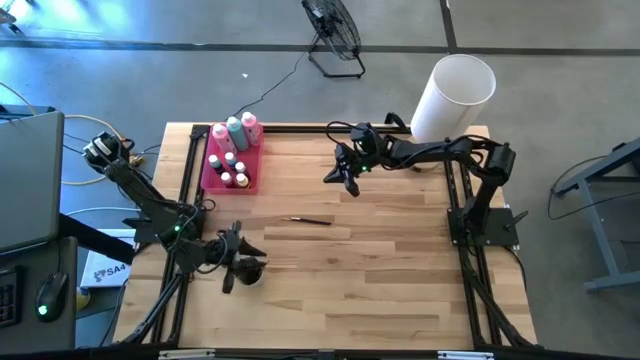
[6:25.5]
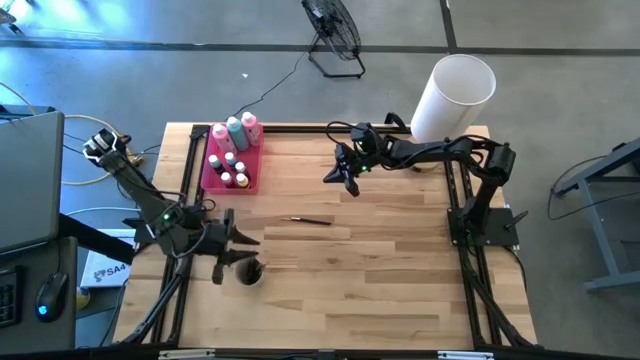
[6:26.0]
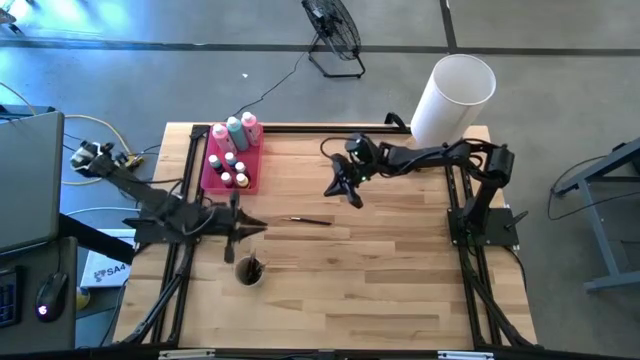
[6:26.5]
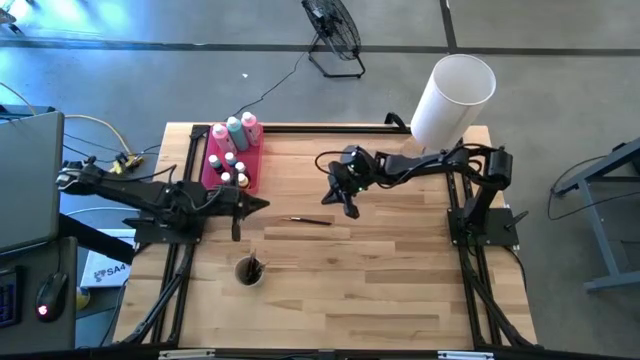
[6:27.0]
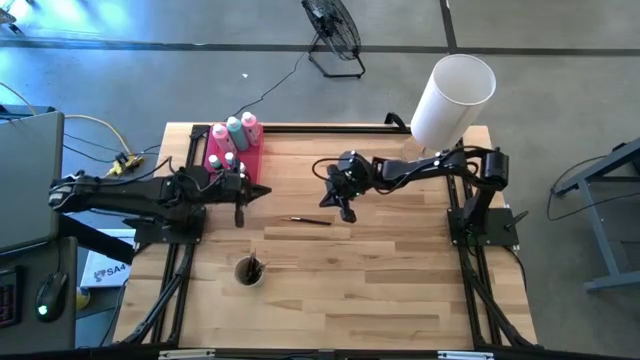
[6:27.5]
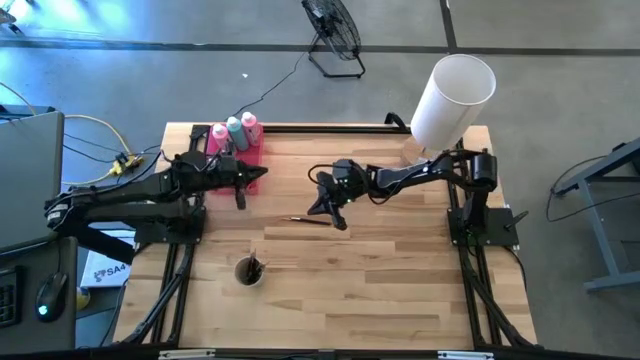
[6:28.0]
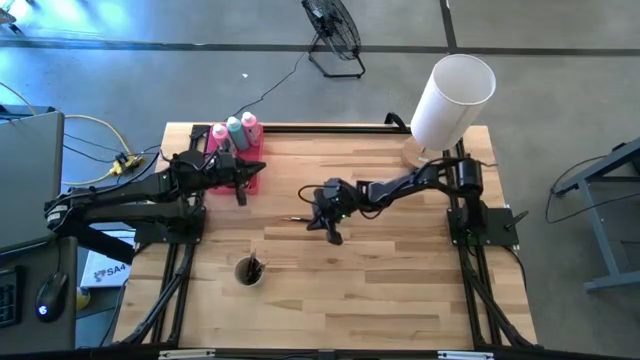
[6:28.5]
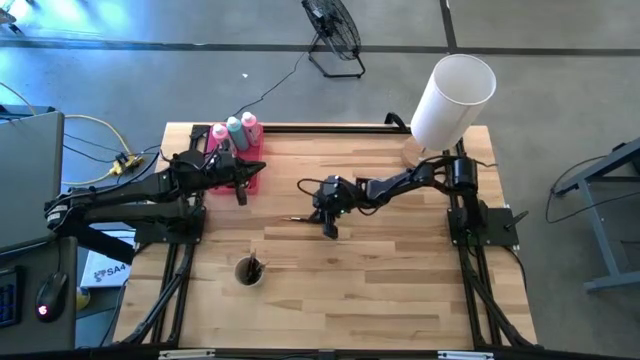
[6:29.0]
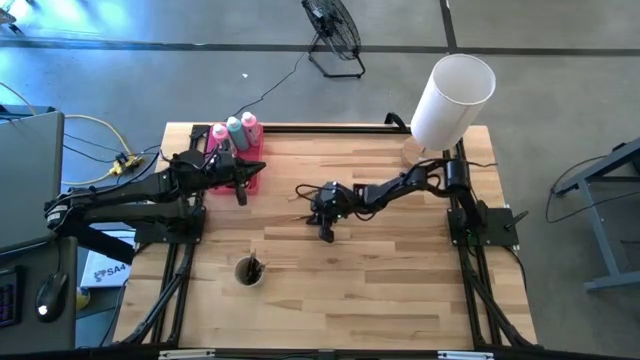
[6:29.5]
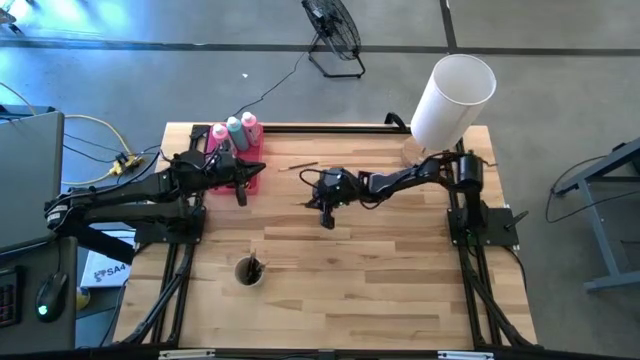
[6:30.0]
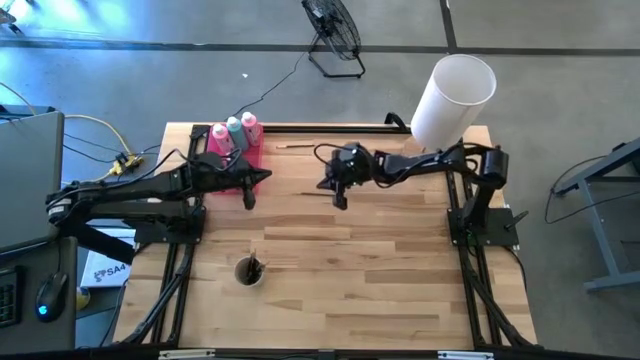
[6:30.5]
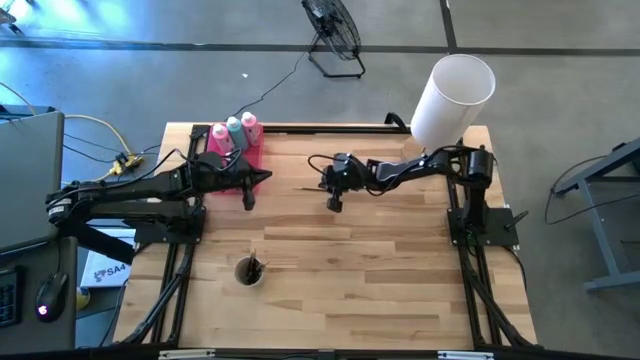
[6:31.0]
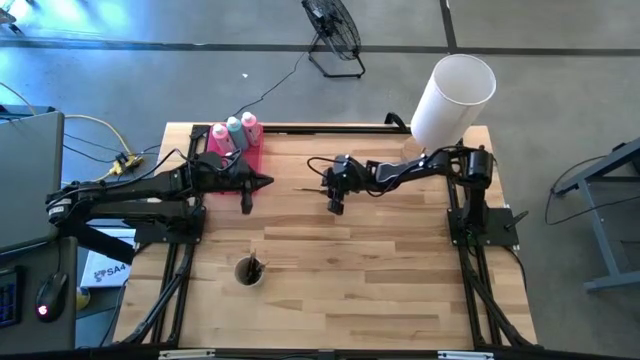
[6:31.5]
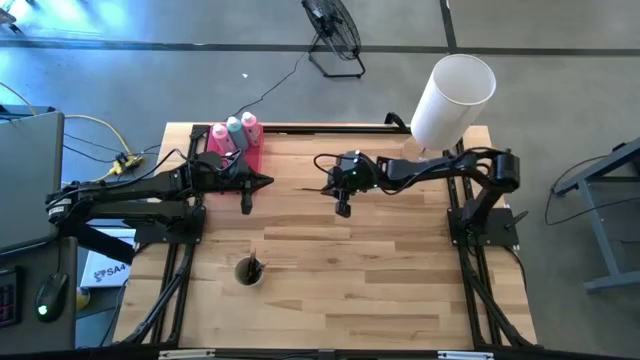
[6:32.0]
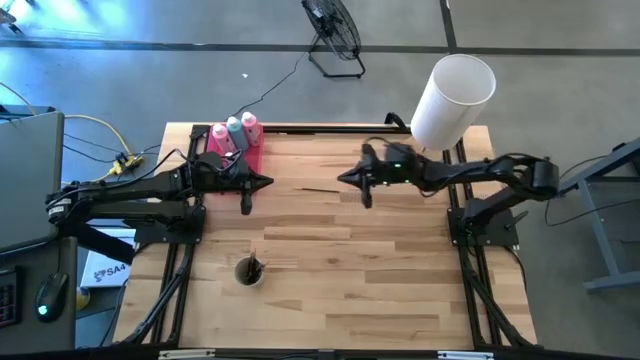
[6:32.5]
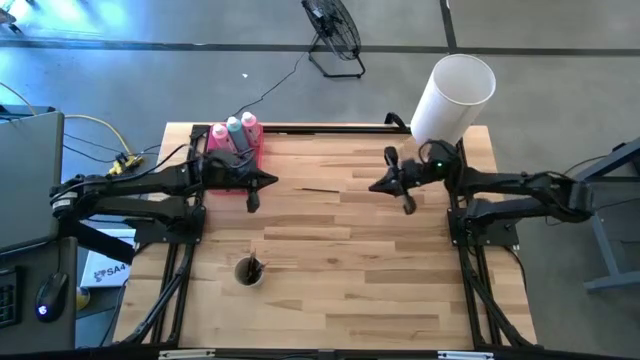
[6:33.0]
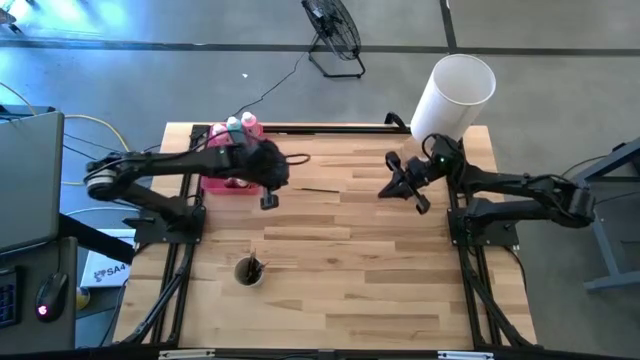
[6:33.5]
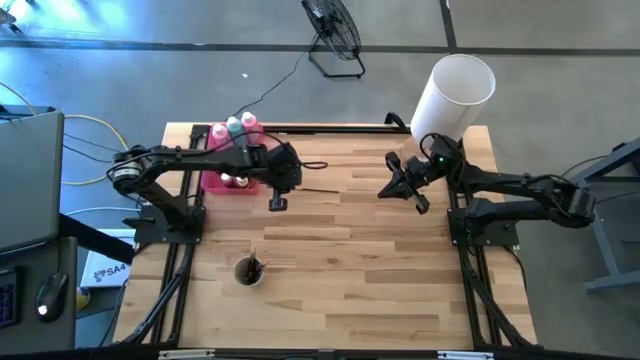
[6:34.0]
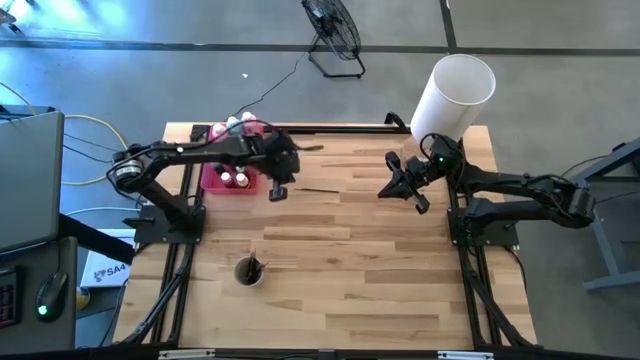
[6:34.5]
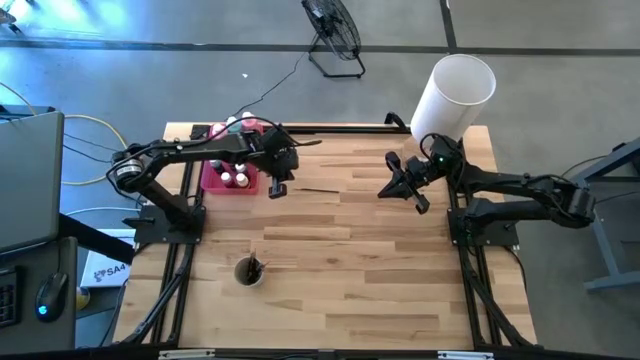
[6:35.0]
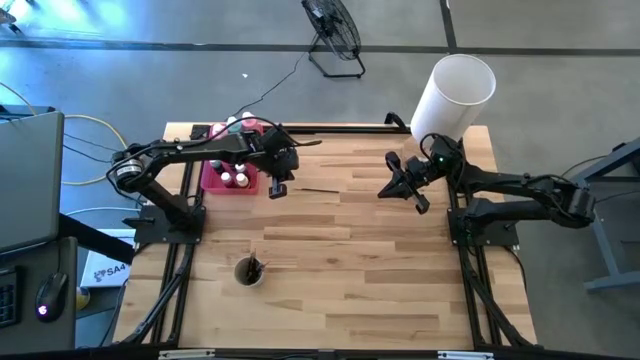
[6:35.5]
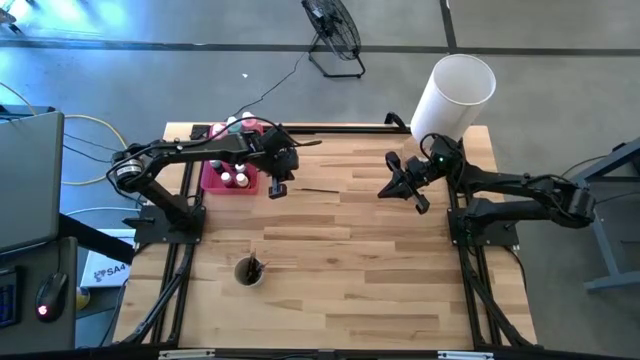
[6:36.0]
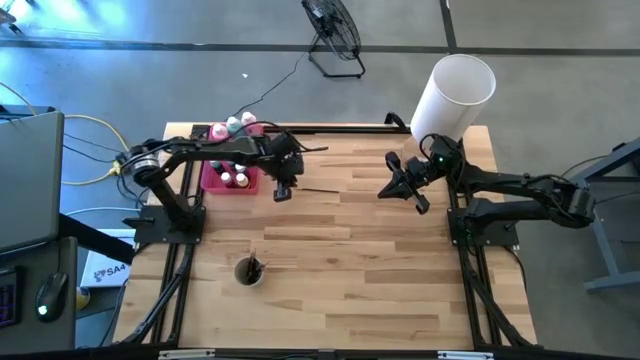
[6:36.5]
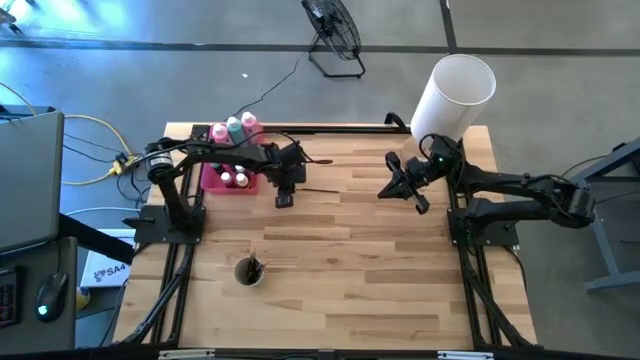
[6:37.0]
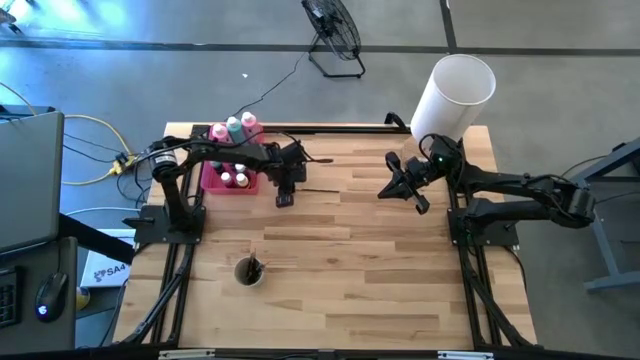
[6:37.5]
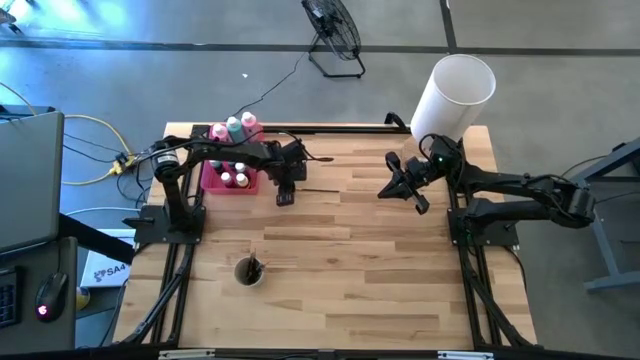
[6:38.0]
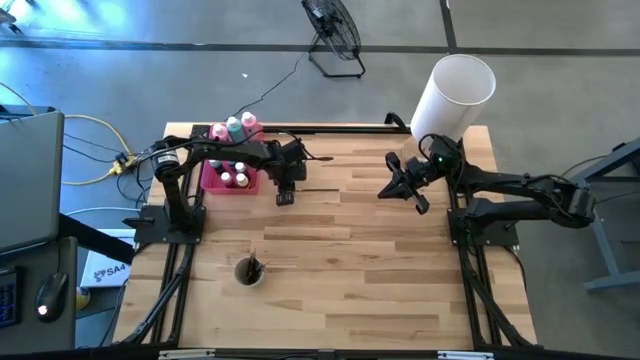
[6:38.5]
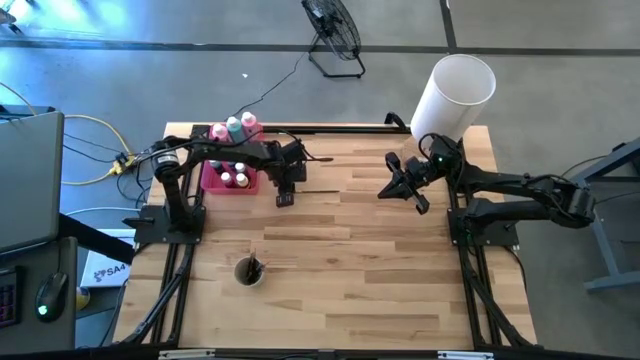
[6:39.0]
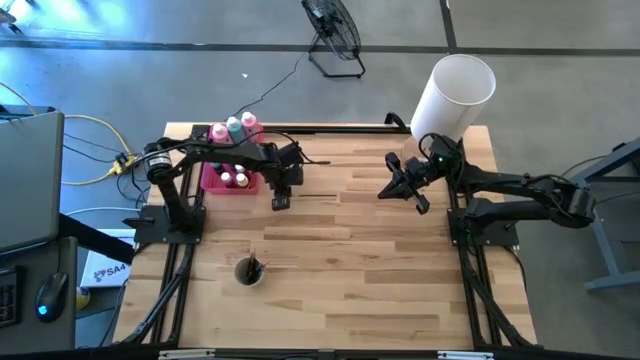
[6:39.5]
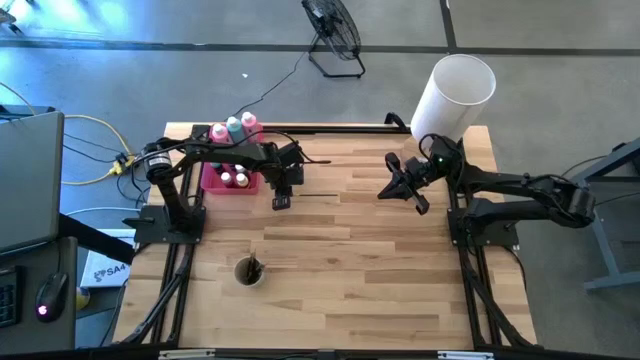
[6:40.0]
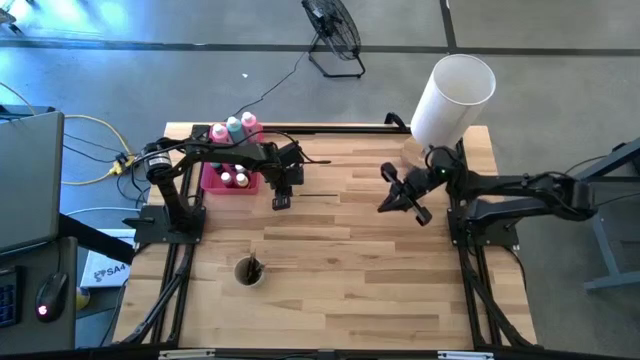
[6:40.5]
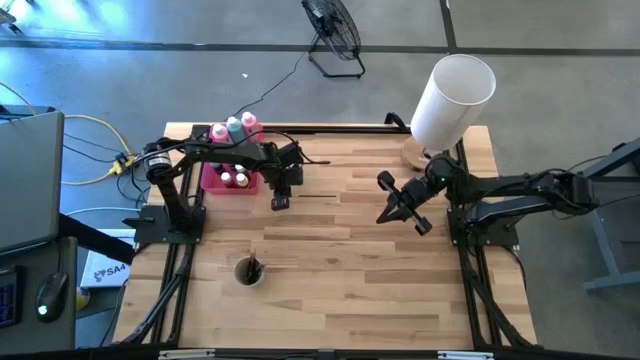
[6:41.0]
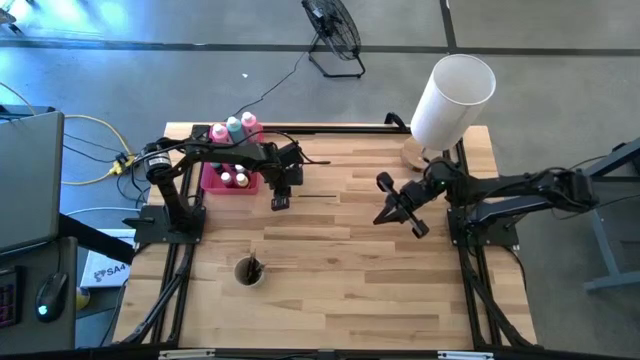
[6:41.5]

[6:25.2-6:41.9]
Task: Pick & Place Paint Supplies
Put the gold paintbrush into the light brown cup
